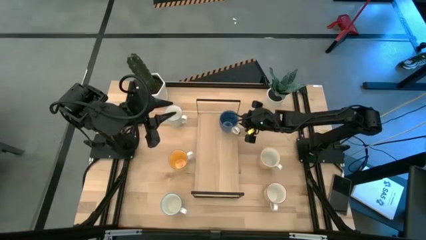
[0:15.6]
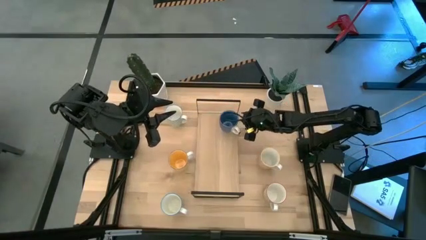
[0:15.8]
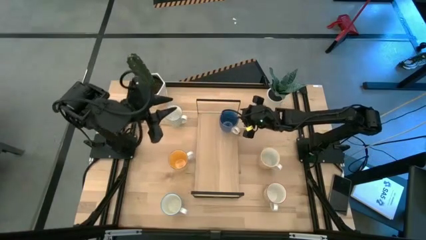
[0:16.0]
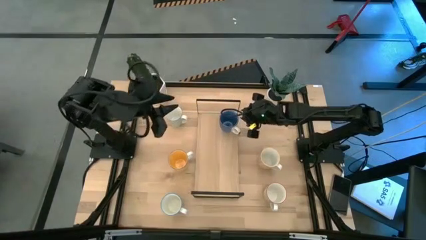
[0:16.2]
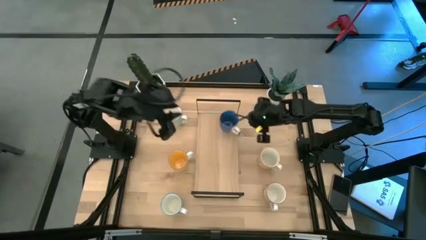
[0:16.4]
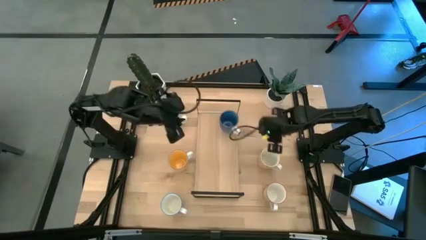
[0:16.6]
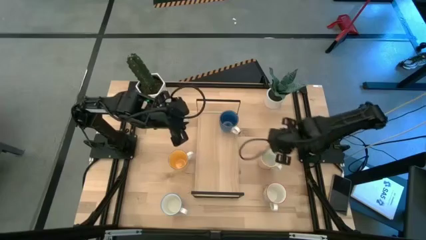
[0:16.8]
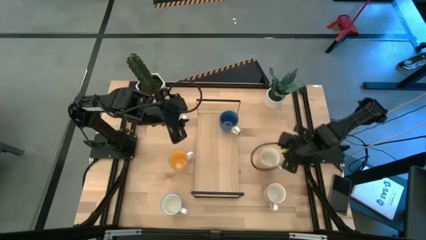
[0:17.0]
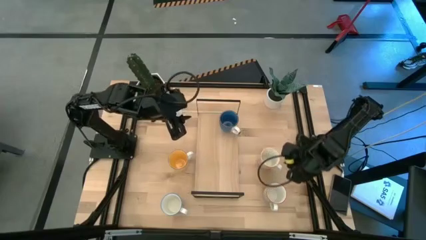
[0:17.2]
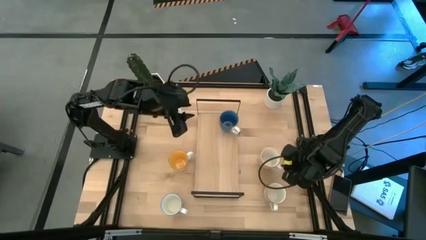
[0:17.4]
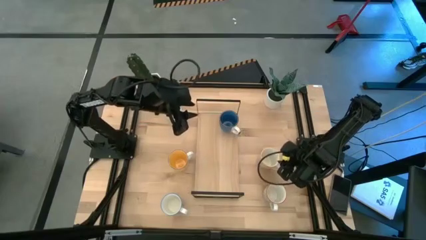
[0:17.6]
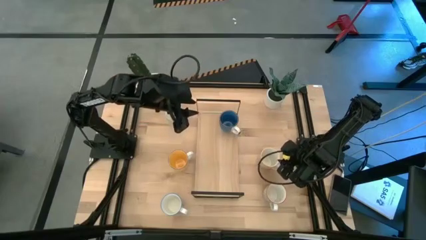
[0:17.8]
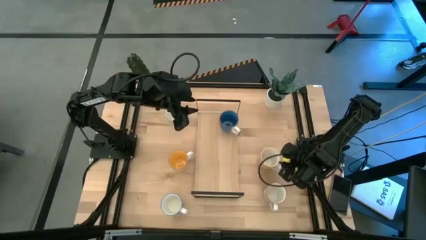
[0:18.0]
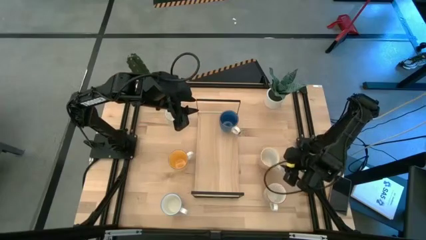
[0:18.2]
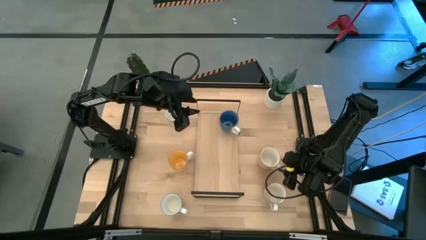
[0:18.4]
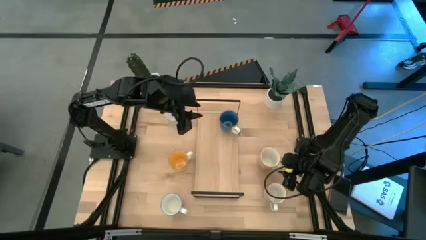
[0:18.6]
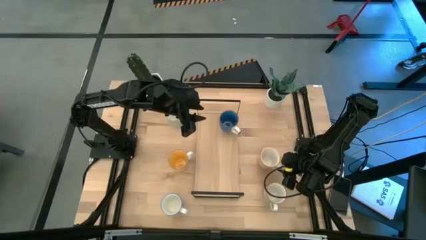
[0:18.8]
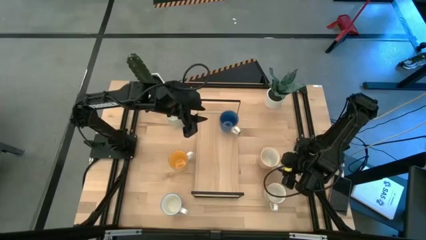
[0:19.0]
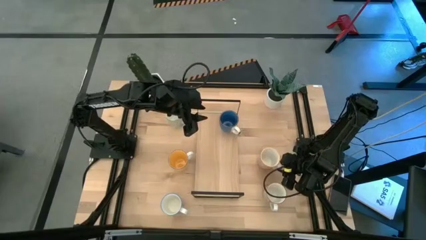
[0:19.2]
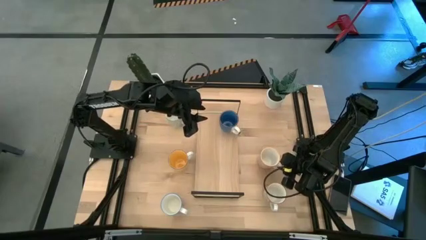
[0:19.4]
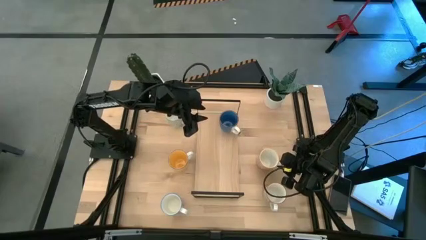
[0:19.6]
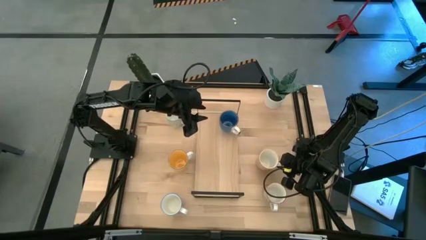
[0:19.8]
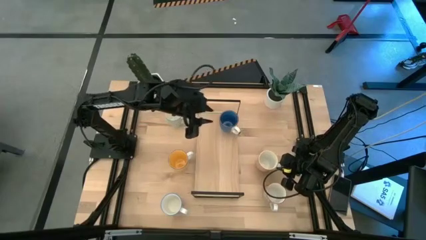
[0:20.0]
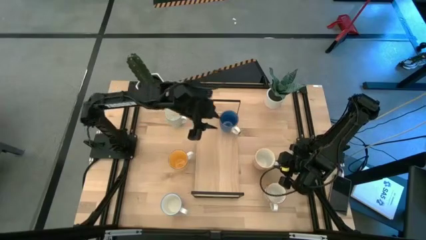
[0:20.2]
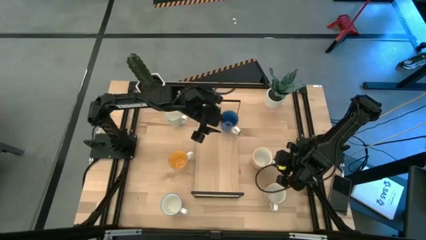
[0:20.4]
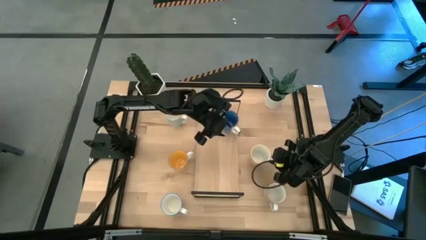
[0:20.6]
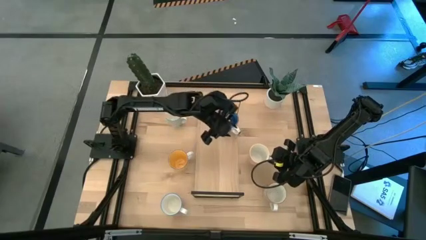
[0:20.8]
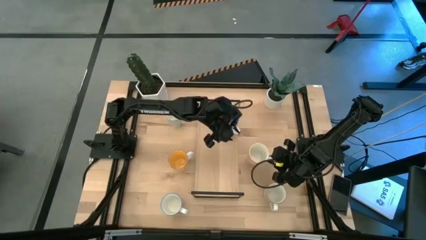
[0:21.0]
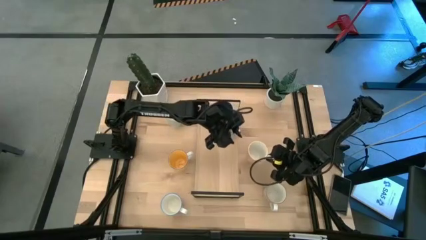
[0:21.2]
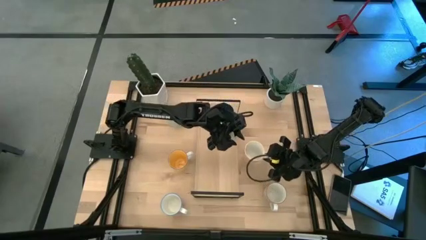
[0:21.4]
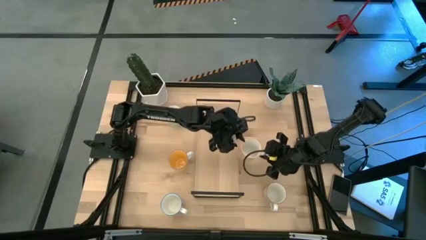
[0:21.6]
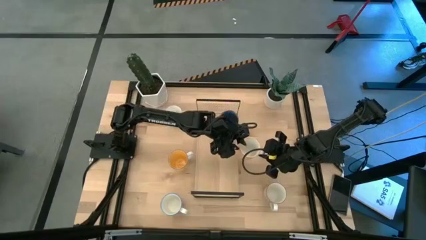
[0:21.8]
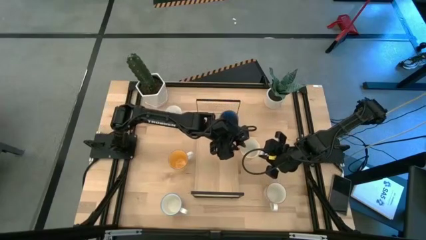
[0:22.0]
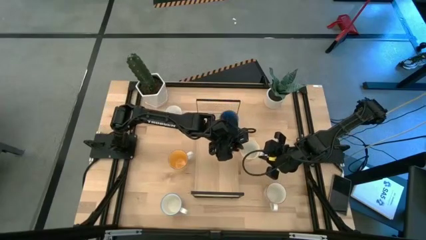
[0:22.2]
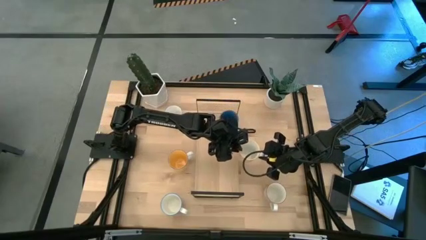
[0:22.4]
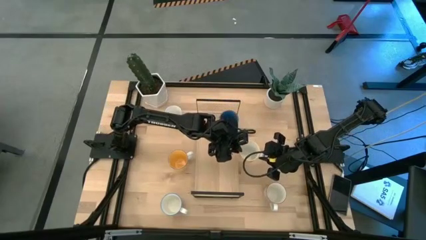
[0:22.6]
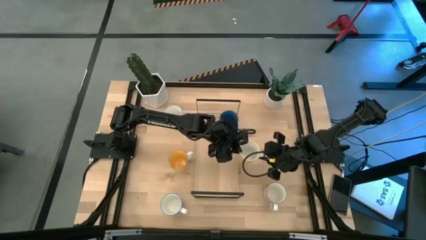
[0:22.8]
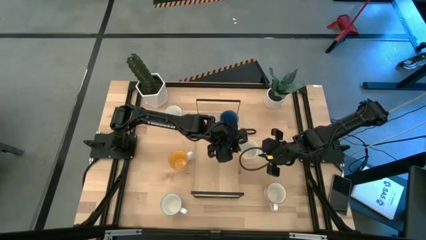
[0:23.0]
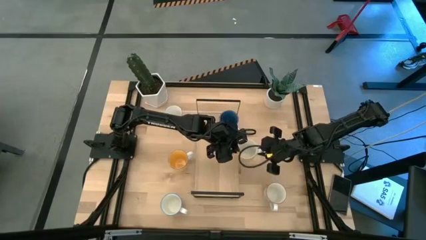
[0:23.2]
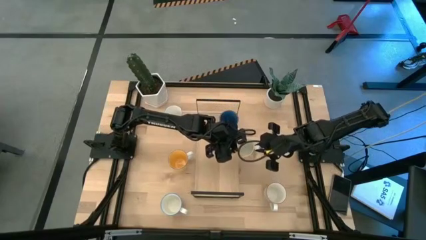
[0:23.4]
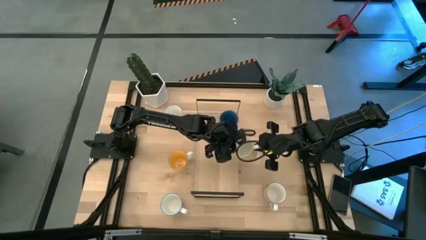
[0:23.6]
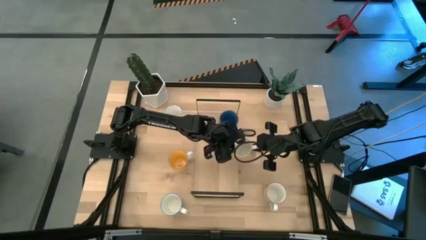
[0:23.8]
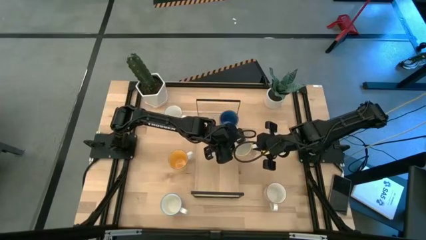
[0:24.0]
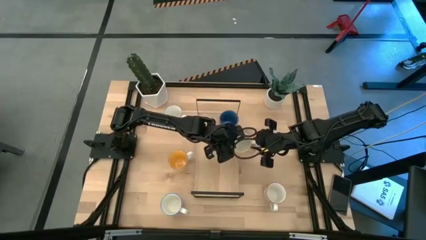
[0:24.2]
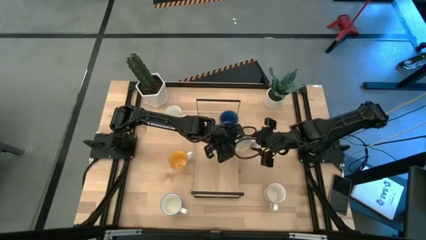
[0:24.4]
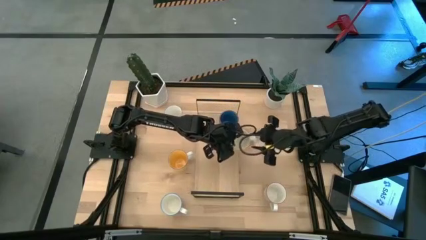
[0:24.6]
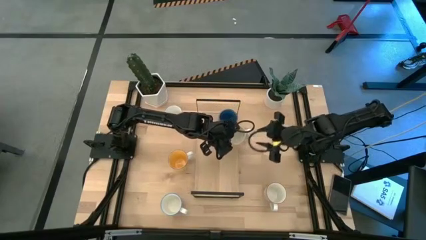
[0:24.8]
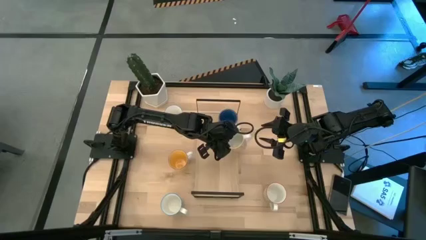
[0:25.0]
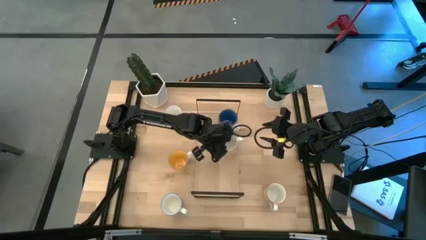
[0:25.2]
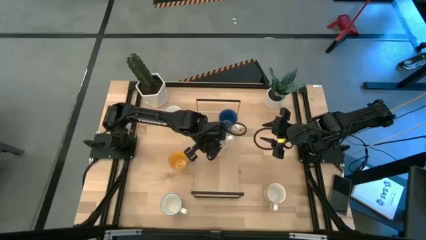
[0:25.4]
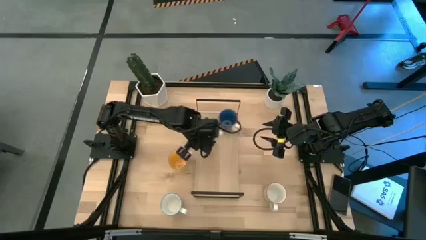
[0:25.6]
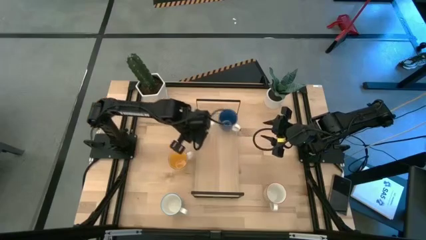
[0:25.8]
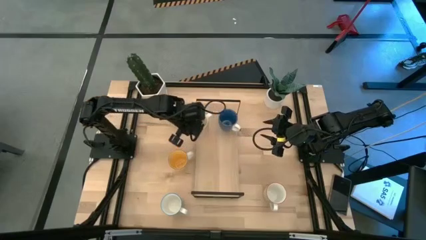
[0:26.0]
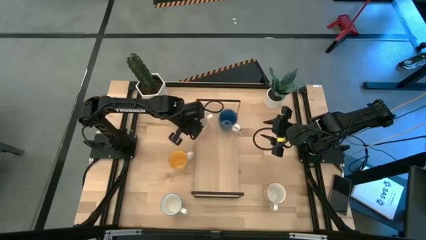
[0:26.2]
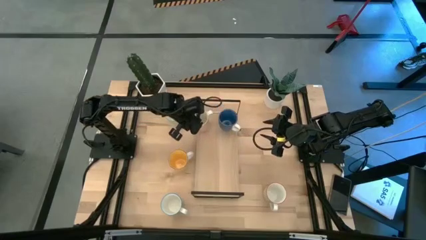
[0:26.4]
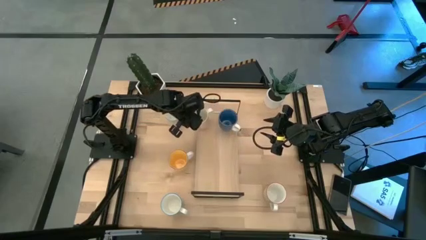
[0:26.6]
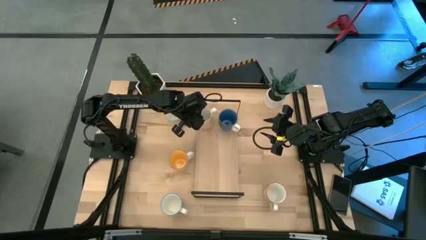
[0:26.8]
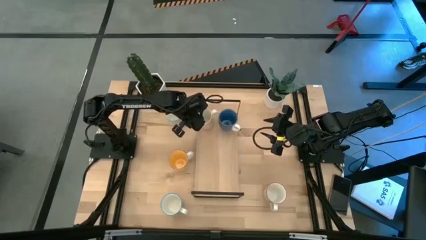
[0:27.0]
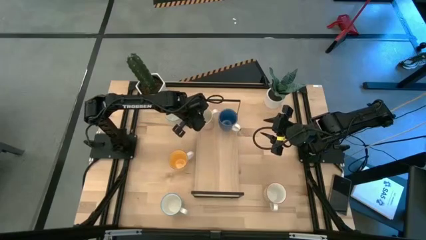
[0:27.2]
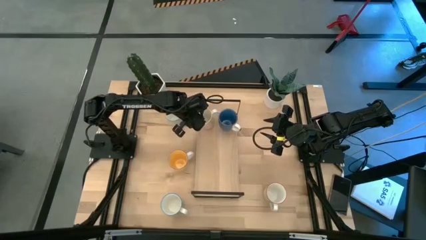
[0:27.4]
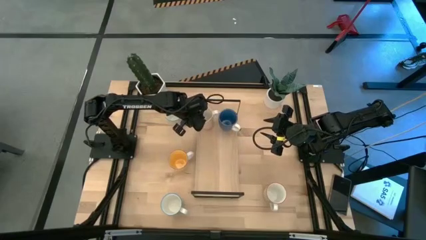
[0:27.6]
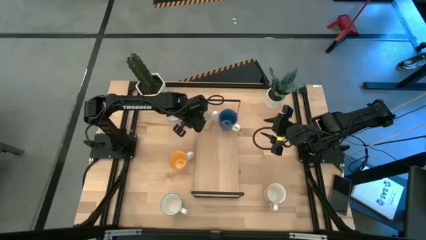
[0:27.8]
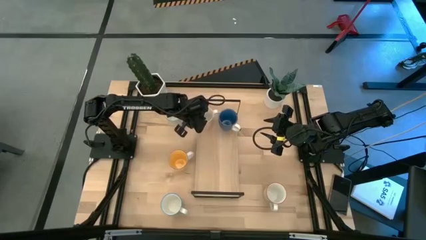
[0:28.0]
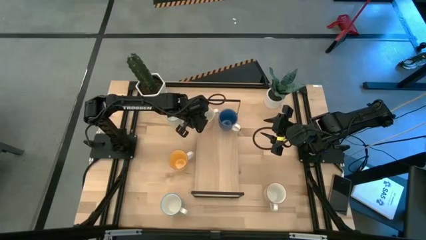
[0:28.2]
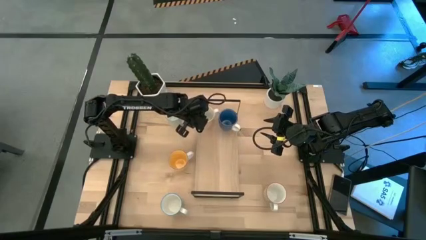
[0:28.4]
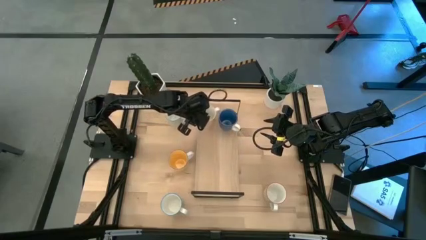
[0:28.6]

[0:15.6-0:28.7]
Task: Place coffee mugs
Put the orange and white mug on the shelf

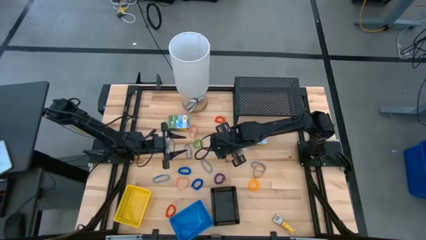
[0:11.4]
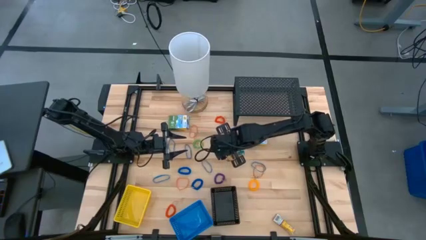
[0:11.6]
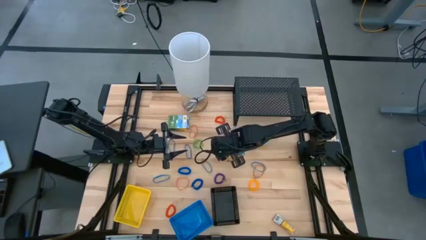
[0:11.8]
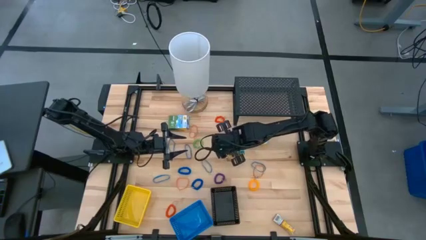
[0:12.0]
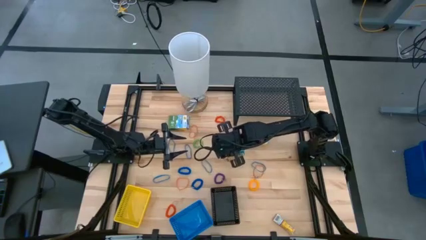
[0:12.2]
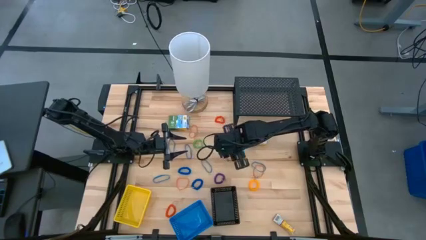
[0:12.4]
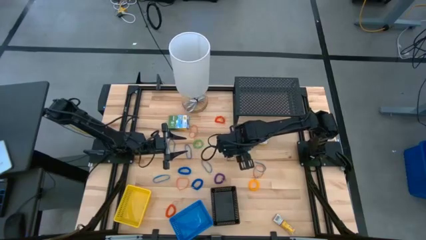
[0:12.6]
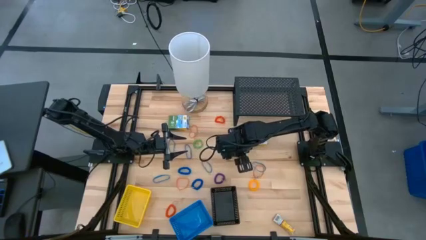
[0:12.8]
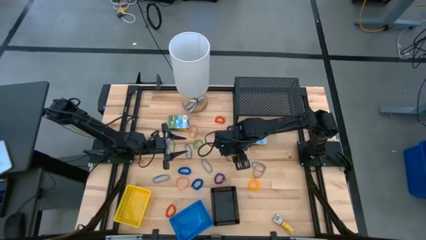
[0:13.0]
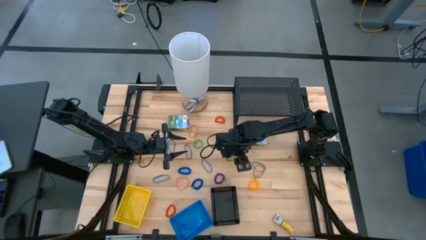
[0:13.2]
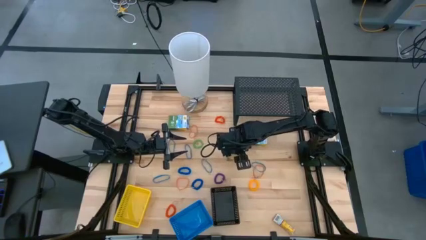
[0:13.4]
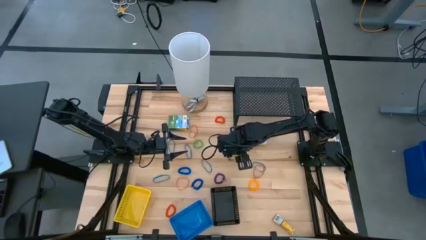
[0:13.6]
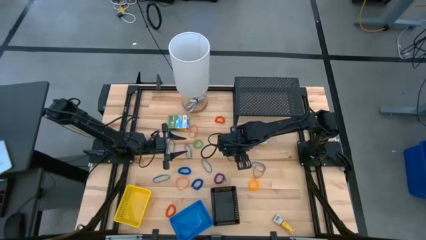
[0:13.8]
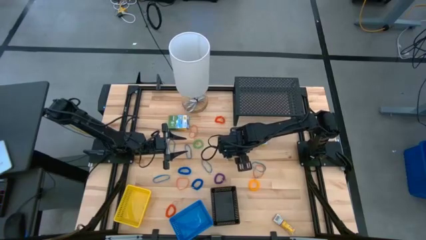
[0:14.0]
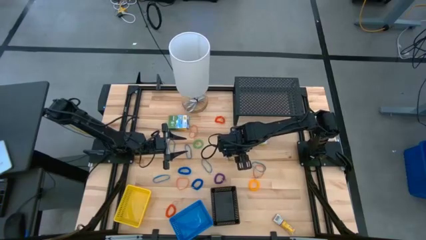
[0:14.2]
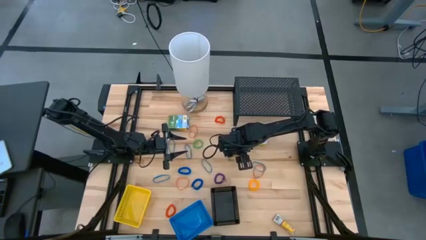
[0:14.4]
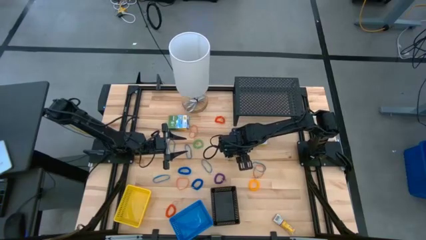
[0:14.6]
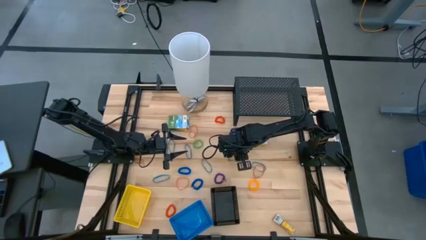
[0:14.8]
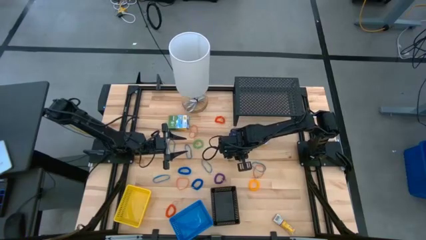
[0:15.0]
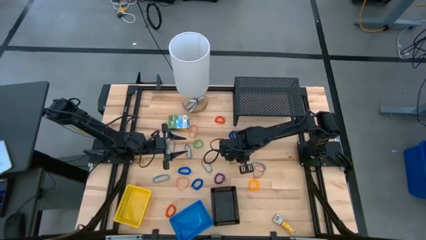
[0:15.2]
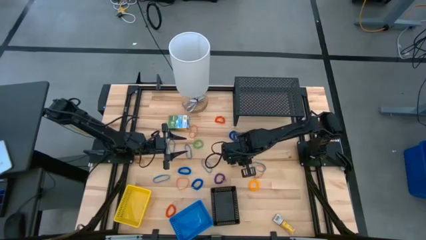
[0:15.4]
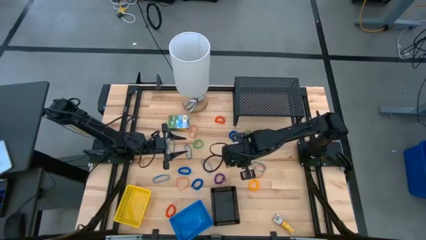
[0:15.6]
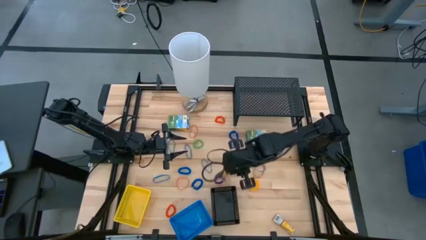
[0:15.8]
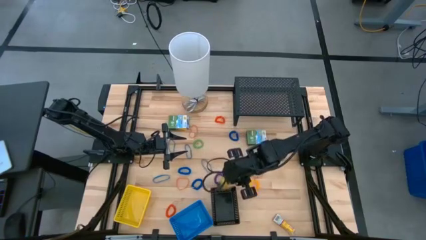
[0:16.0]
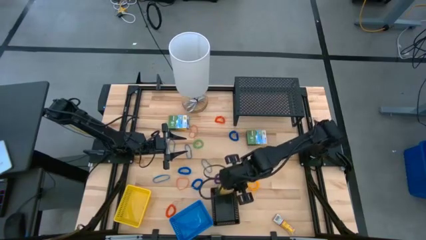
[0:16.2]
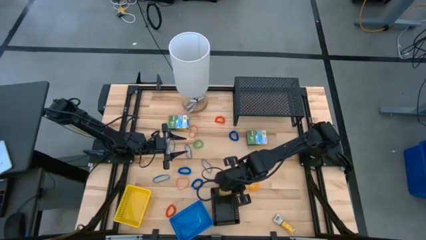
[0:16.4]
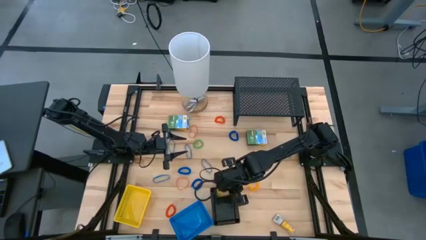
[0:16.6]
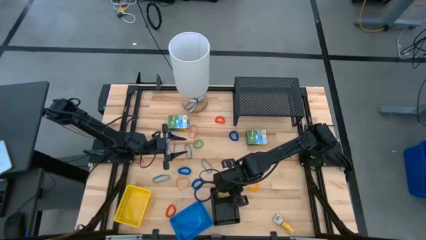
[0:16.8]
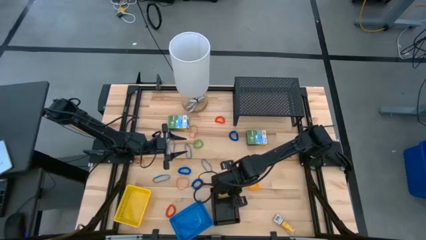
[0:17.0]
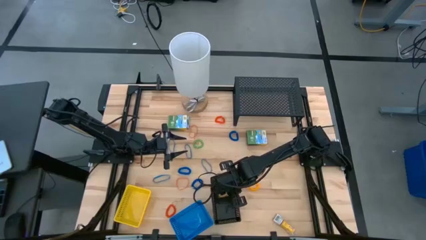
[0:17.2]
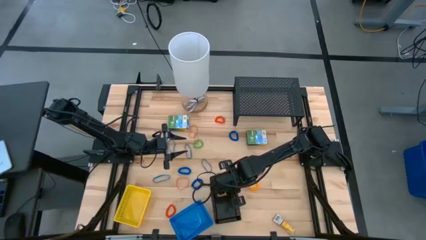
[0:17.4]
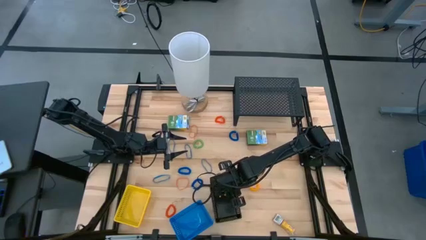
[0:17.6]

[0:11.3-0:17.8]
Task: Pick & Place Office Desk Supplies
Put the yellow crayon box into the black bin
